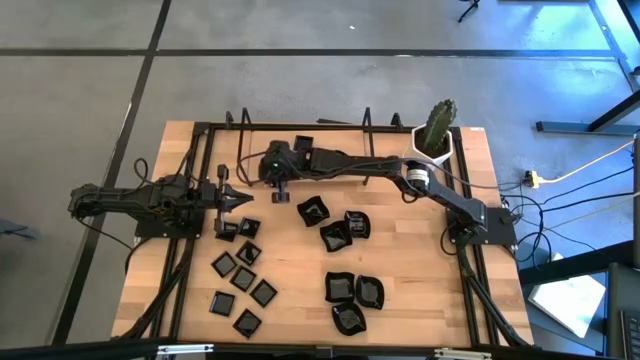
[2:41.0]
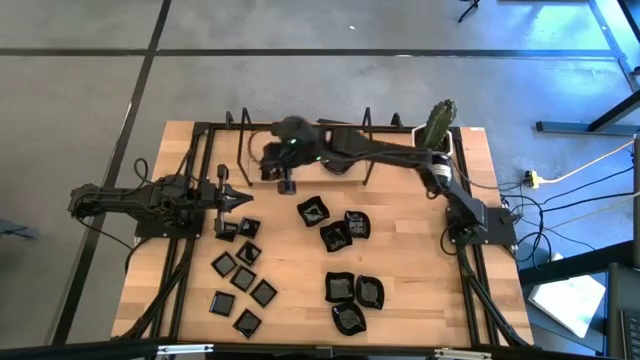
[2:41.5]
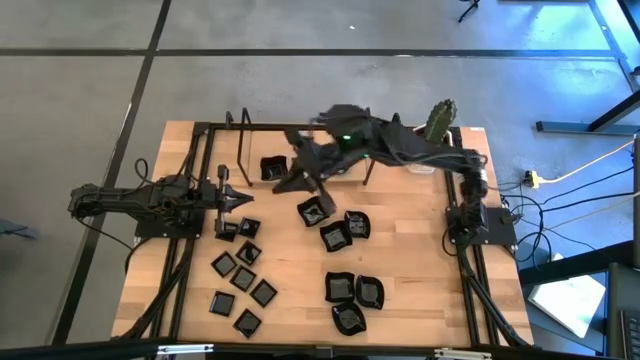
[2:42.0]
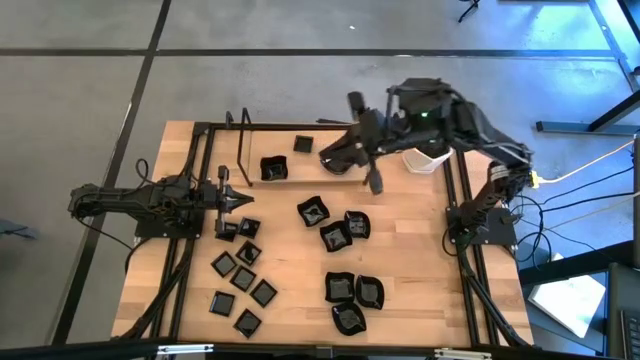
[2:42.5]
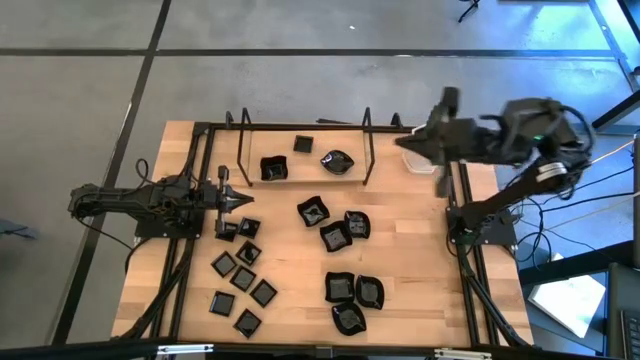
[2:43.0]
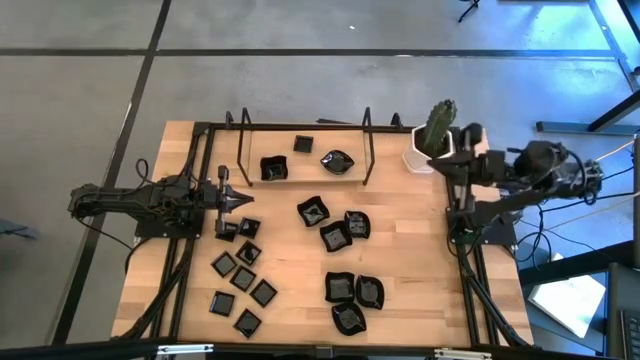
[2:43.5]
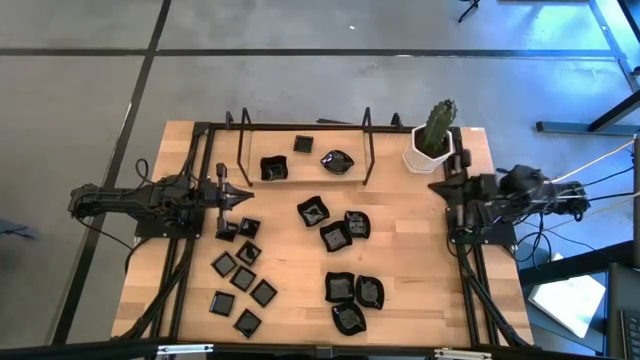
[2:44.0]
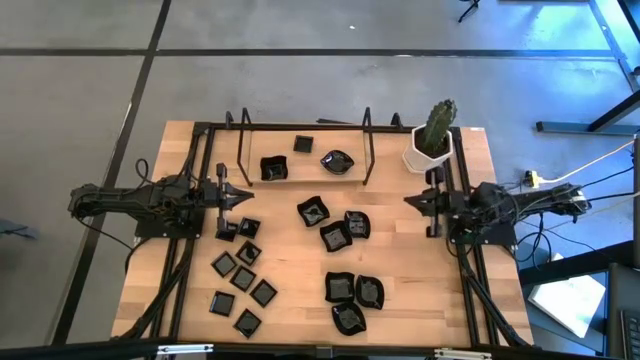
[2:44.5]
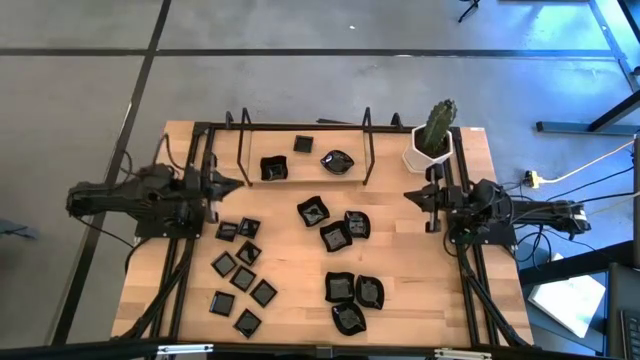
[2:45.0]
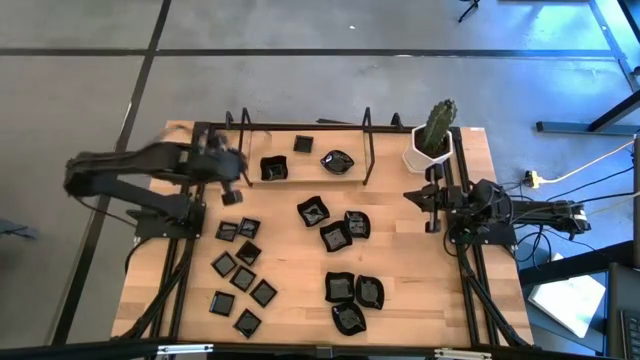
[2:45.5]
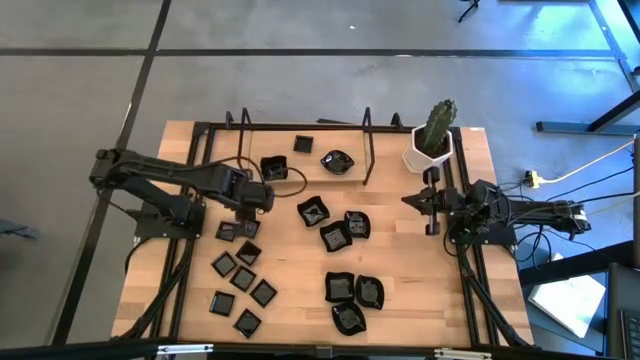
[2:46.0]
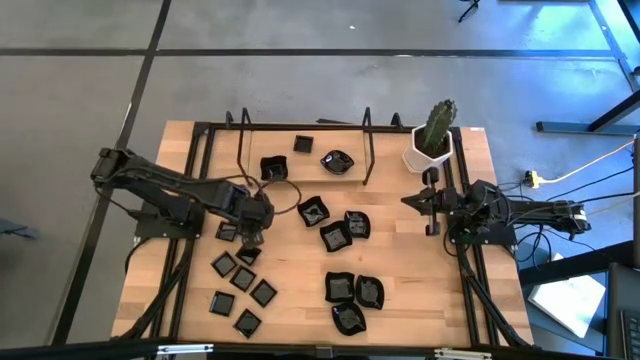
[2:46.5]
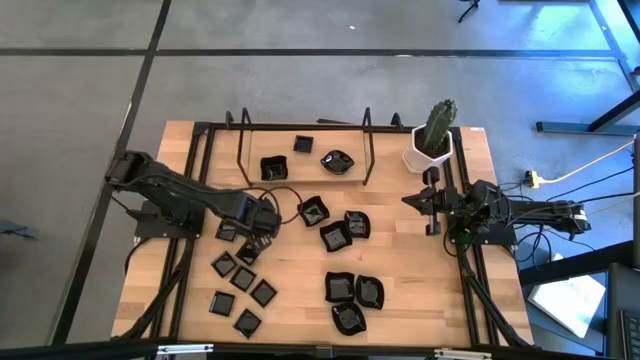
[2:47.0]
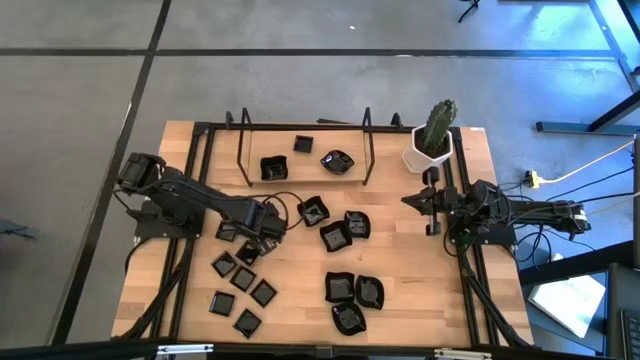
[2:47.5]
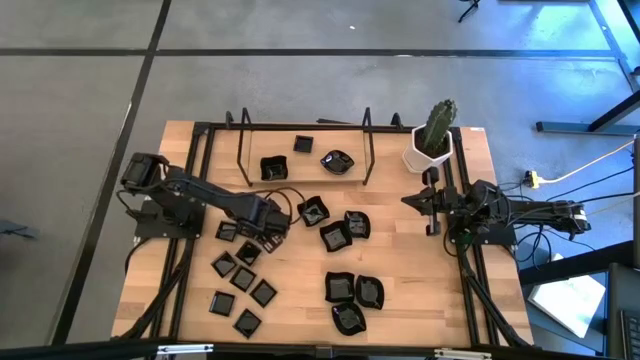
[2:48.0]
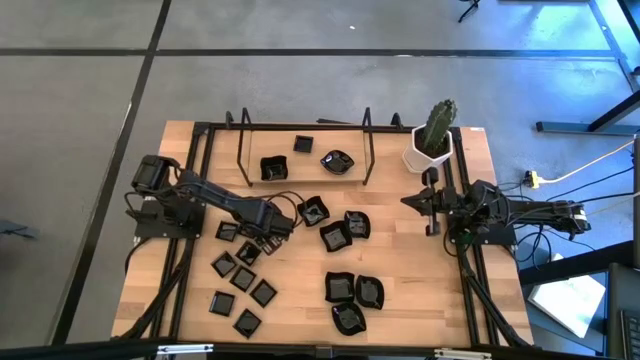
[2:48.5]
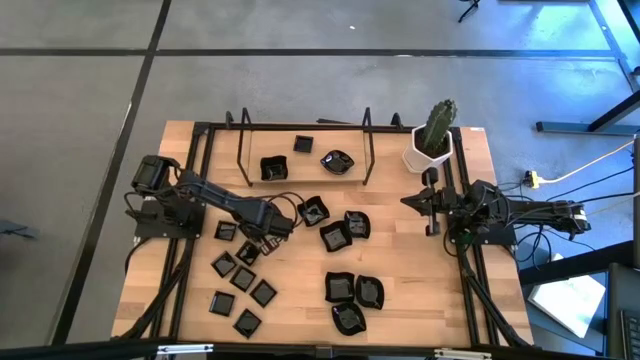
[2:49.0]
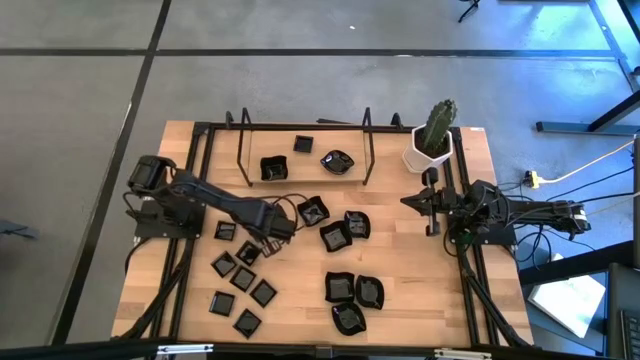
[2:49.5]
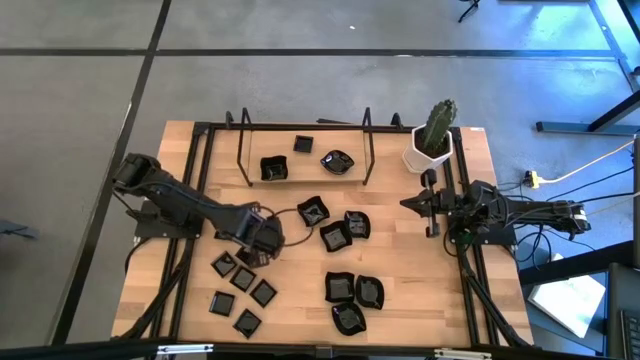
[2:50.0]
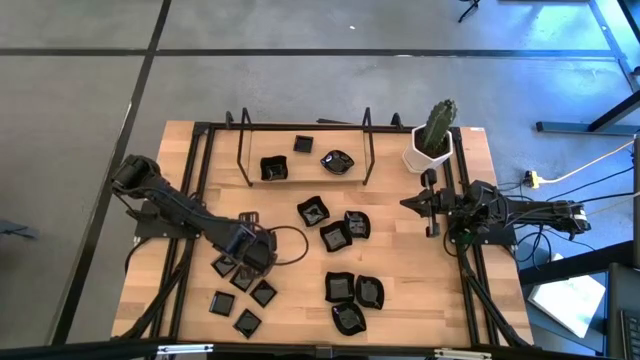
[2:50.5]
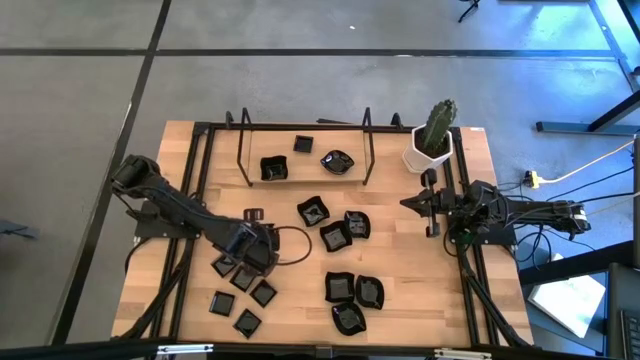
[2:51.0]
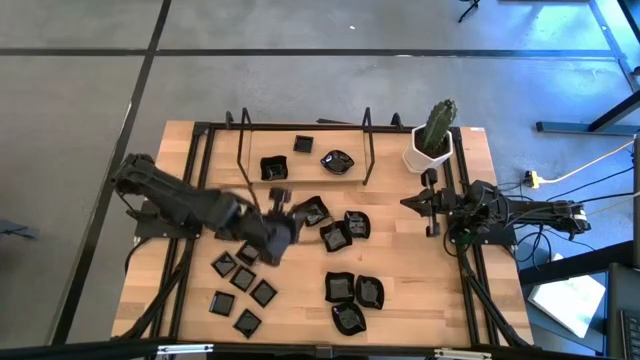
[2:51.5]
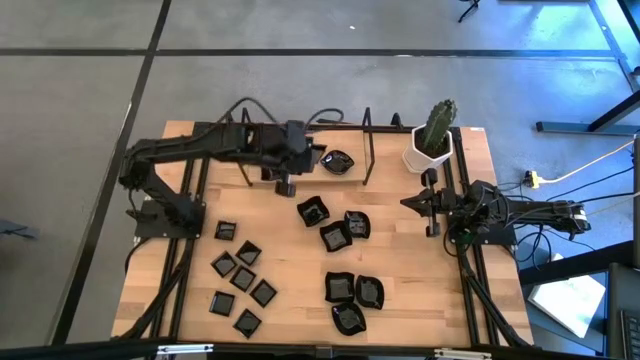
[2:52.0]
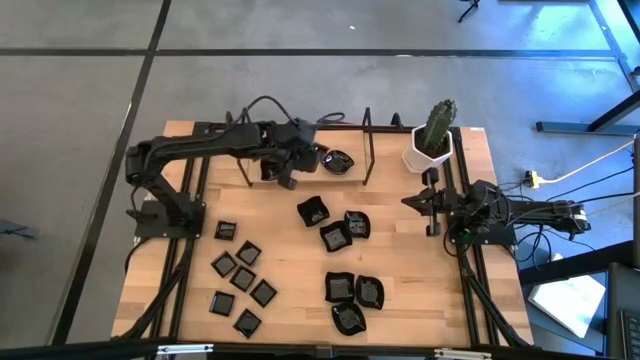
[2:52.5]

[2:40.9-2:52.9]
Task: Pick & Place Mini shaped plates
Stack the square plate on top of the square plate on the shelf

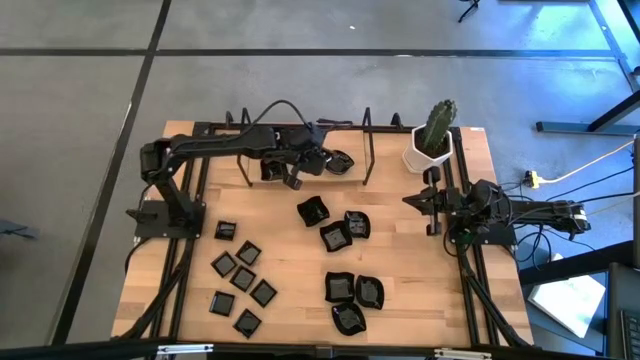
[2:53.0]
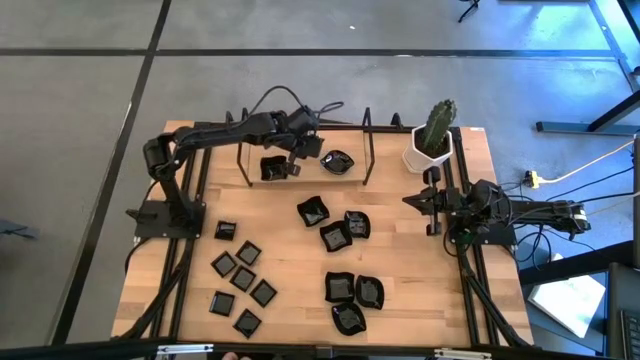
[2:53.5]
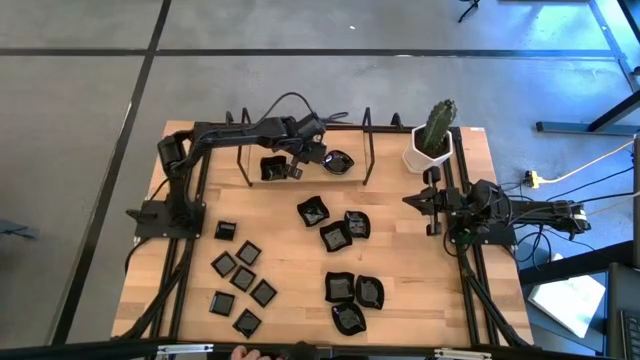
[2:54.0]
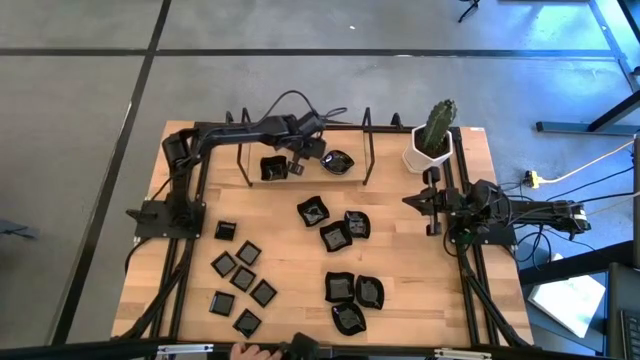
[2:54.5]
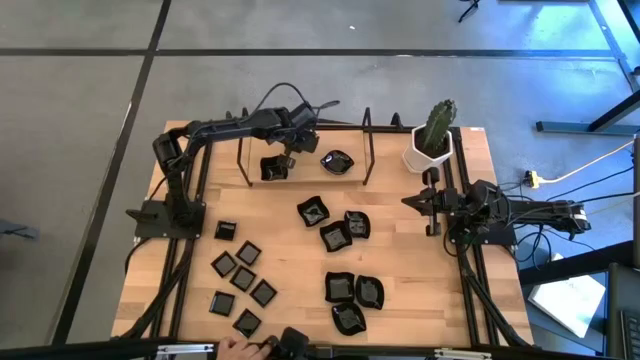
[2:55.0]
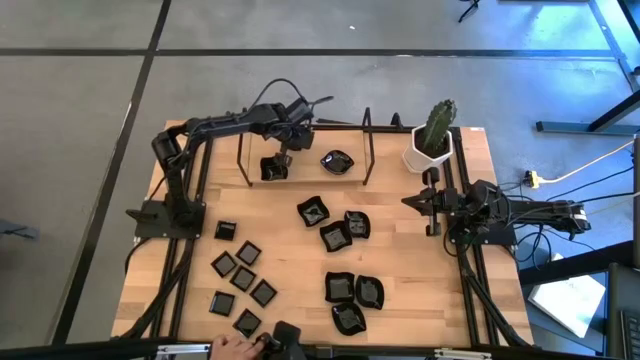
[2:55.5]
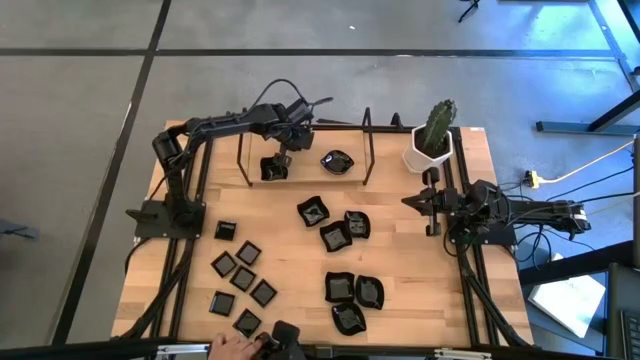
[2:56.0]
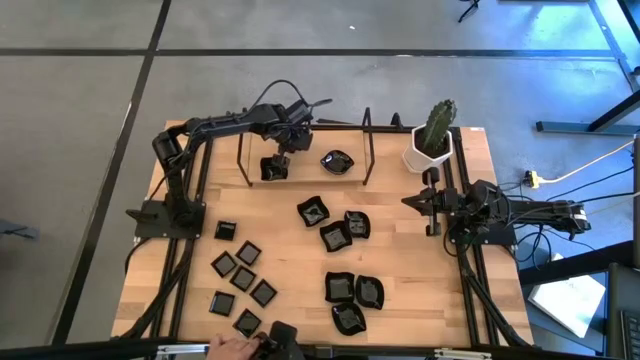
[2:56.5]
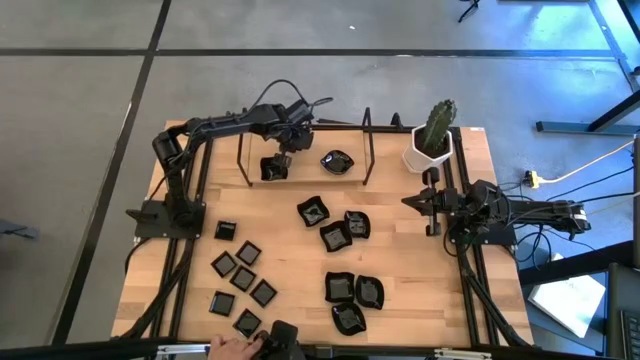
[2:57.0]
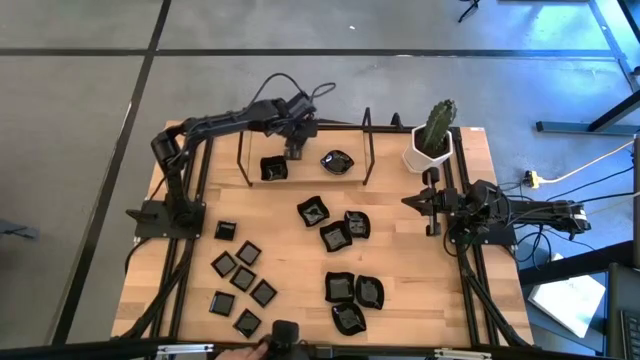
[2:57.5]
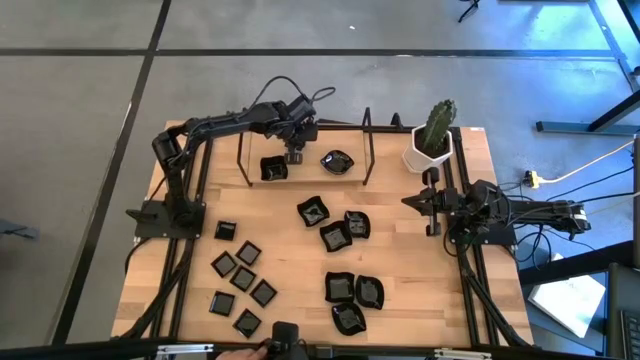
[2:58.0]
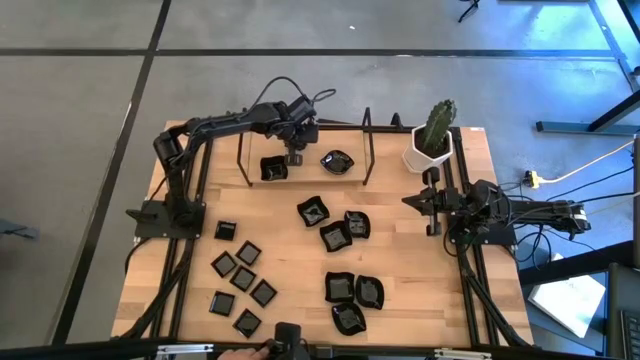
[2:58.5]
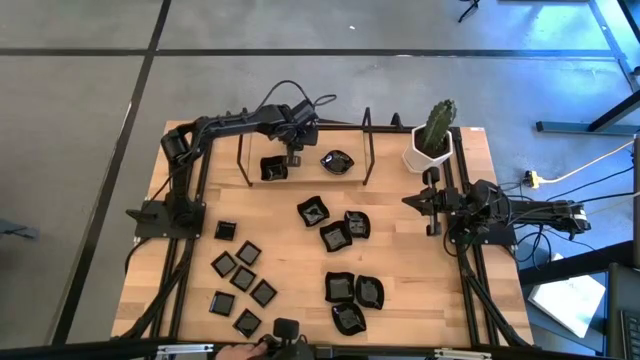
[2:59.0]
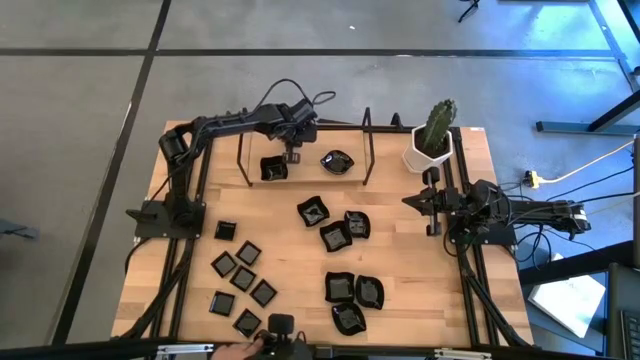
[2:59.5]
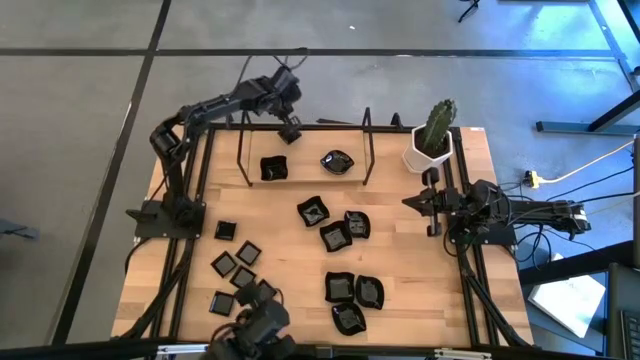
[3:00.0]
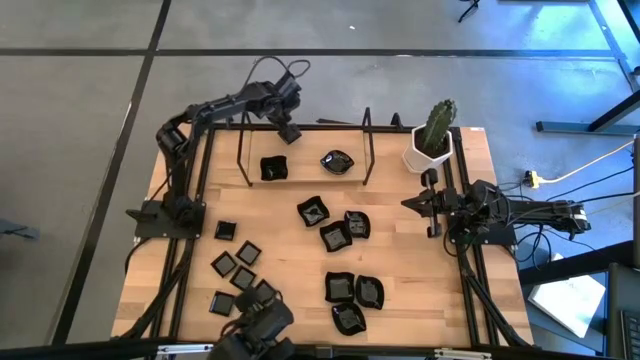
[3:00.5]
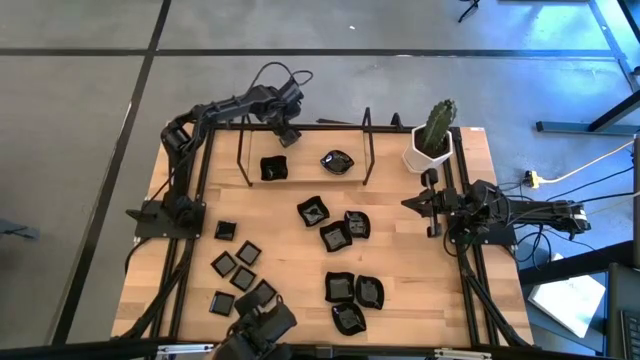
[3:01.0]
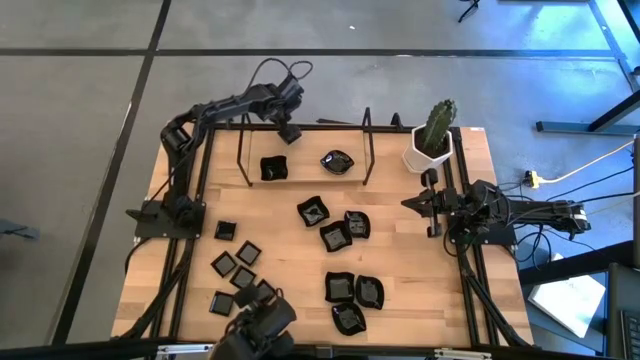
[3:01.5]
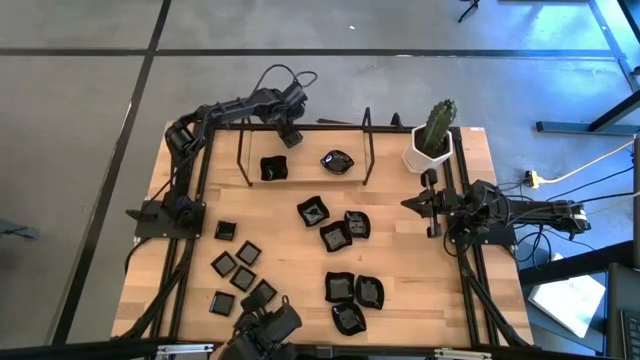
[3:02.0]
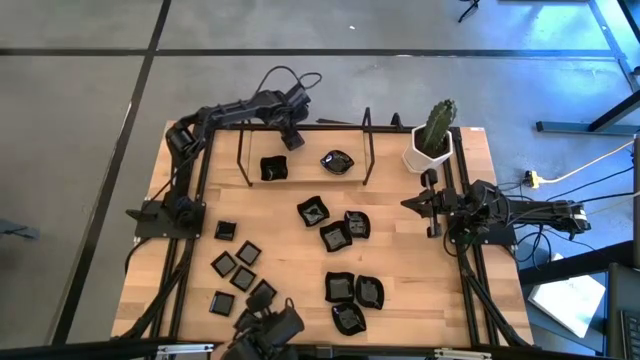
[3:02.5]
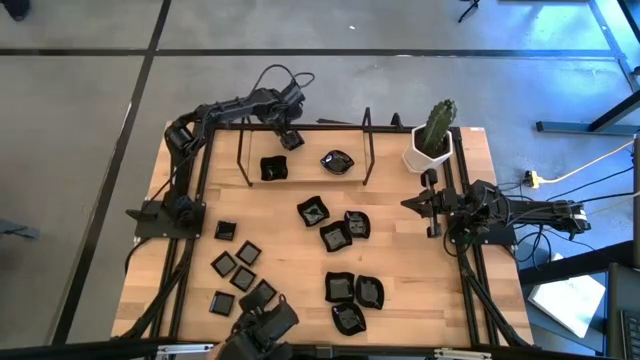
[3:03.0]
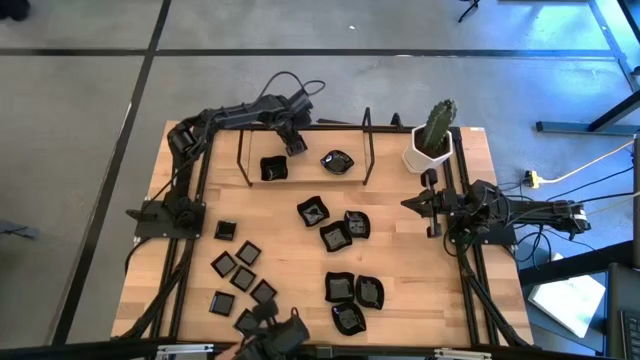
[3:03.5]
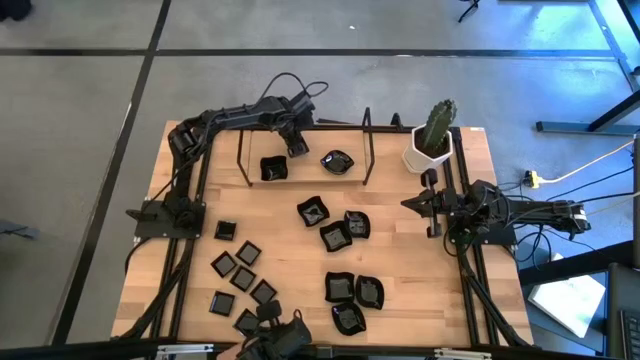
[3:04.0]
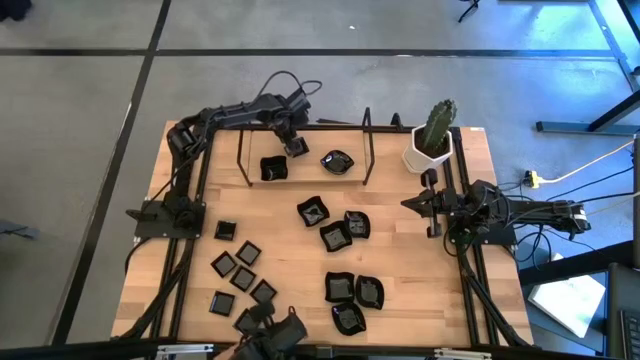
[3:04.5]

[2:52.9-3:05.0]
Stack the square plate on top of the square plate on the shelf
